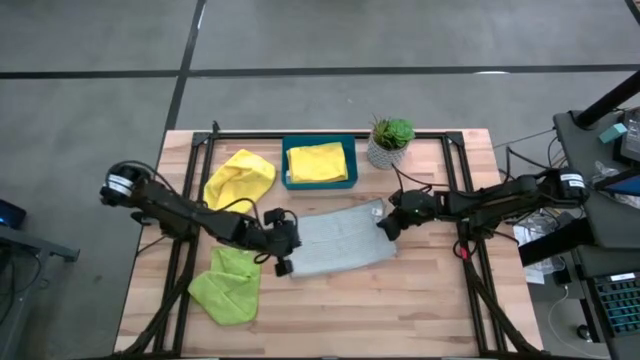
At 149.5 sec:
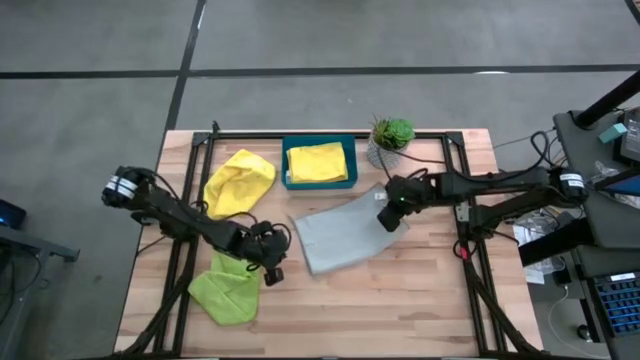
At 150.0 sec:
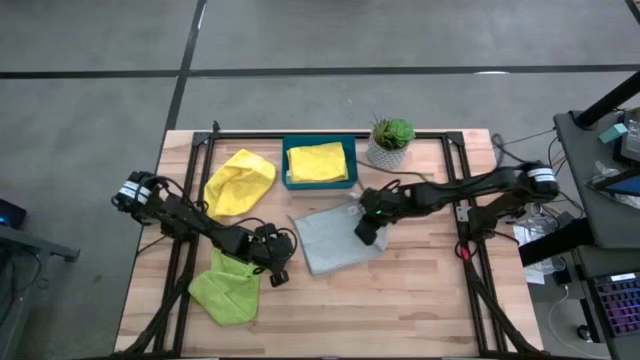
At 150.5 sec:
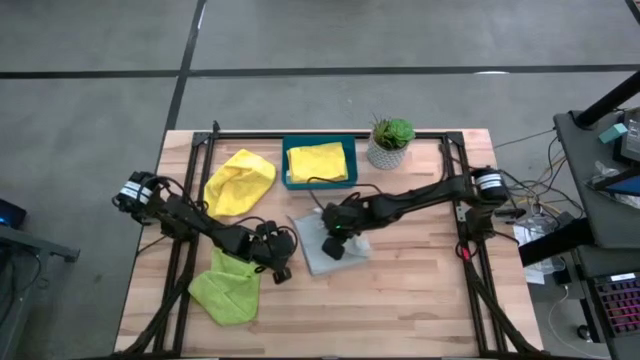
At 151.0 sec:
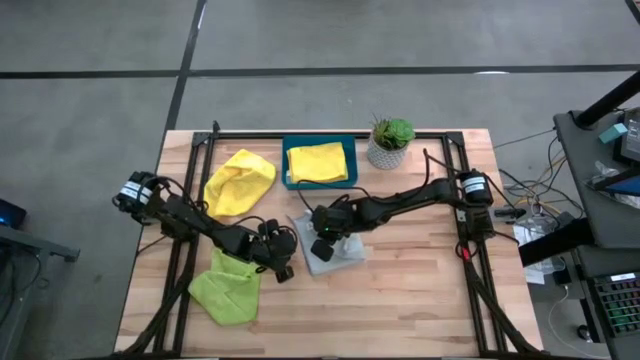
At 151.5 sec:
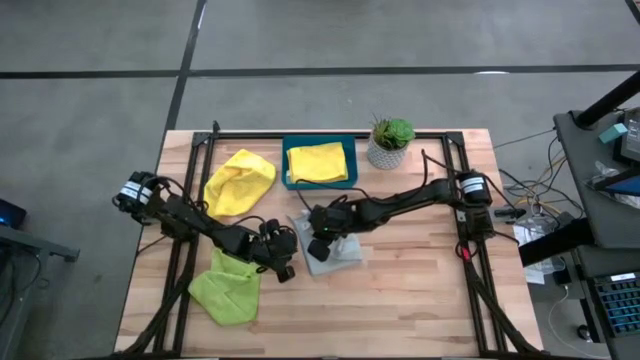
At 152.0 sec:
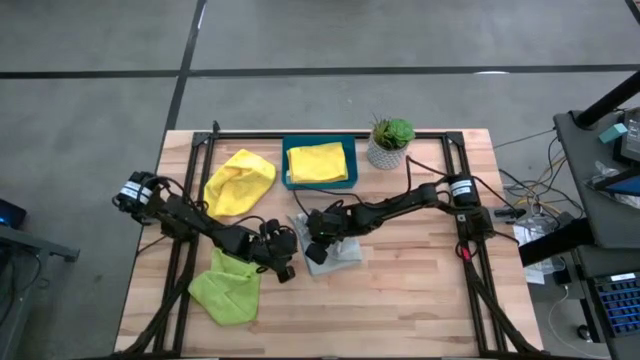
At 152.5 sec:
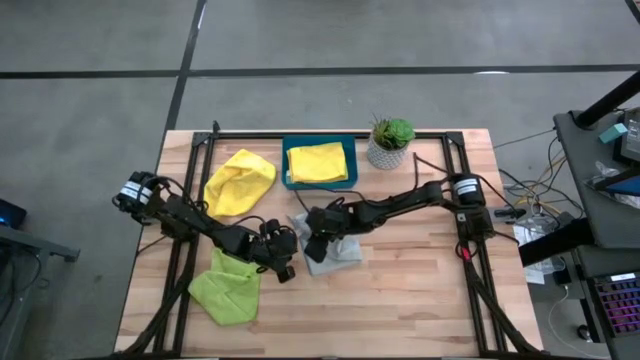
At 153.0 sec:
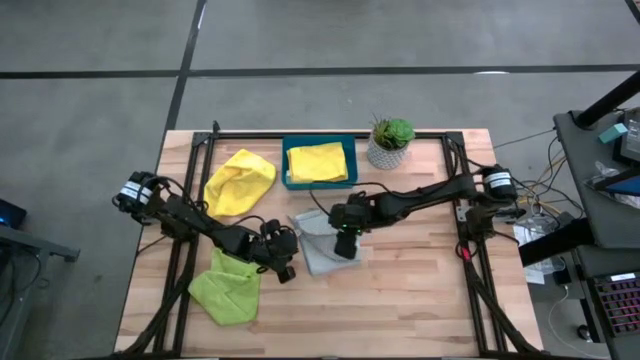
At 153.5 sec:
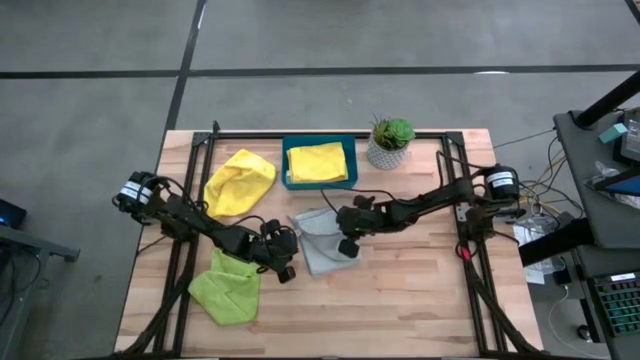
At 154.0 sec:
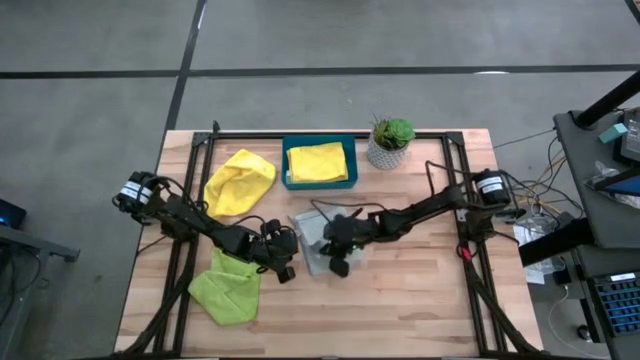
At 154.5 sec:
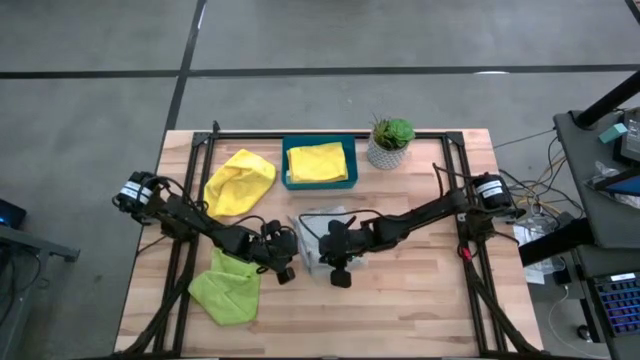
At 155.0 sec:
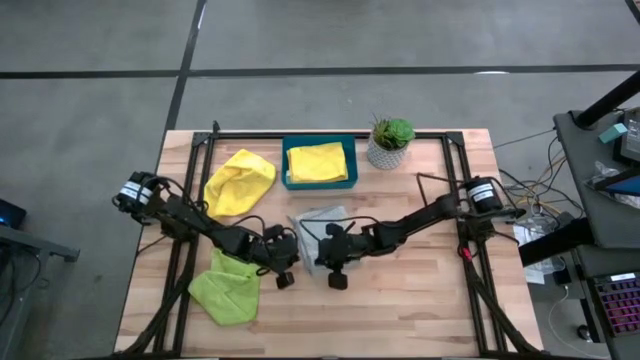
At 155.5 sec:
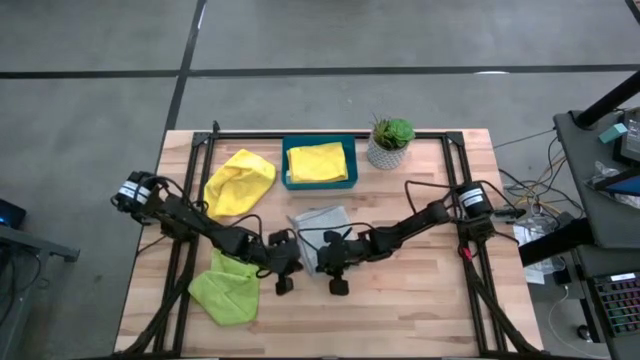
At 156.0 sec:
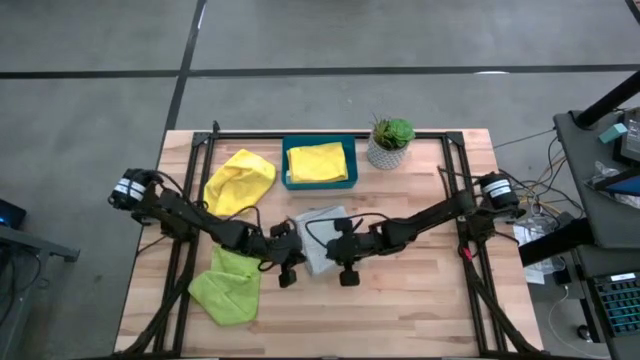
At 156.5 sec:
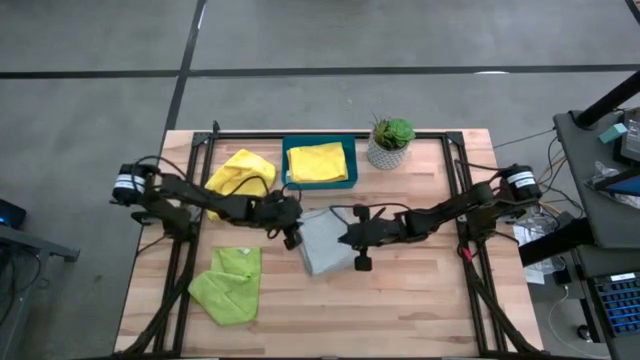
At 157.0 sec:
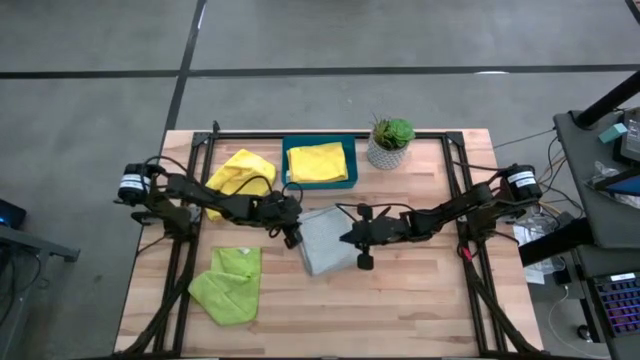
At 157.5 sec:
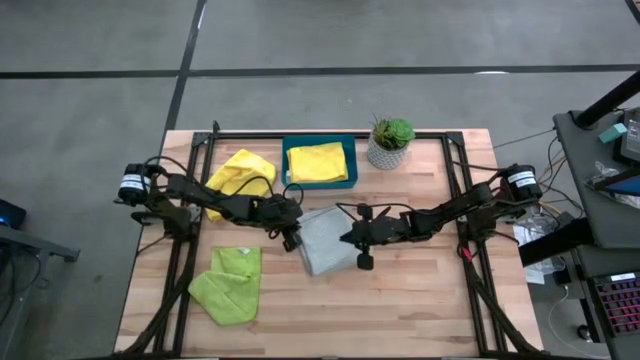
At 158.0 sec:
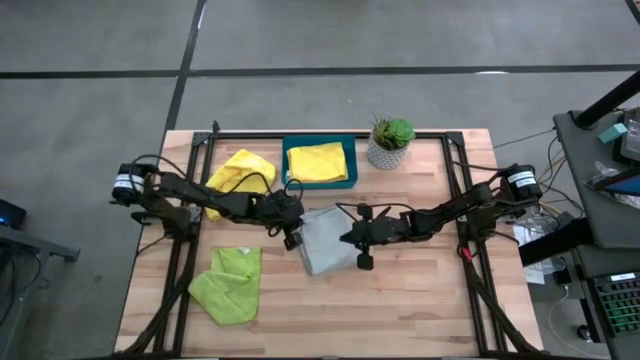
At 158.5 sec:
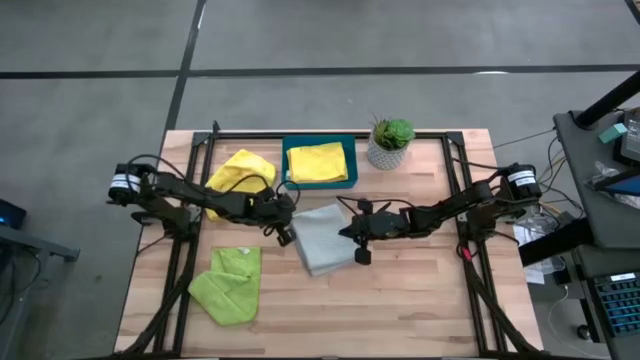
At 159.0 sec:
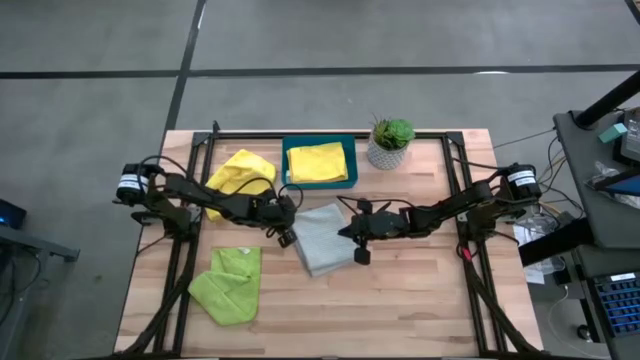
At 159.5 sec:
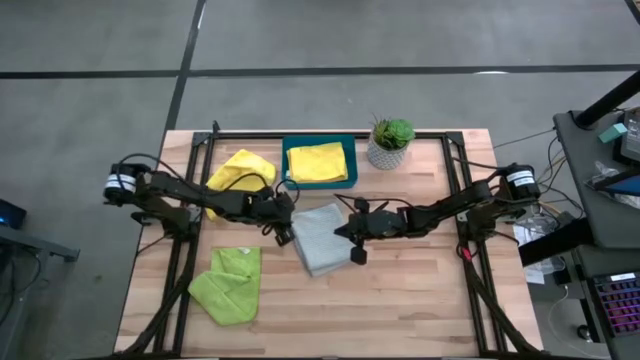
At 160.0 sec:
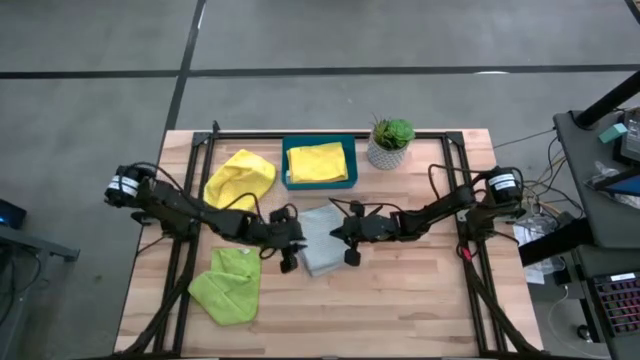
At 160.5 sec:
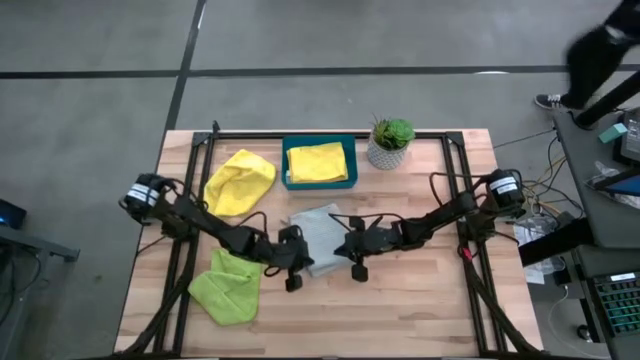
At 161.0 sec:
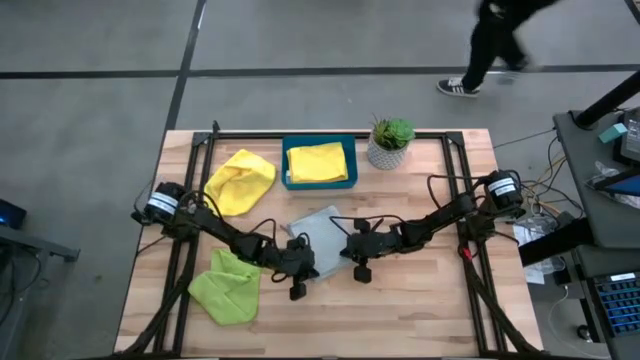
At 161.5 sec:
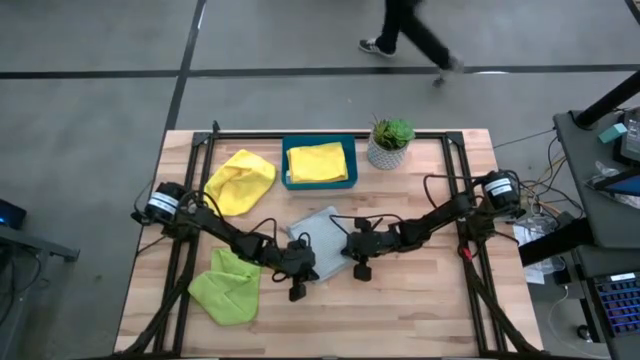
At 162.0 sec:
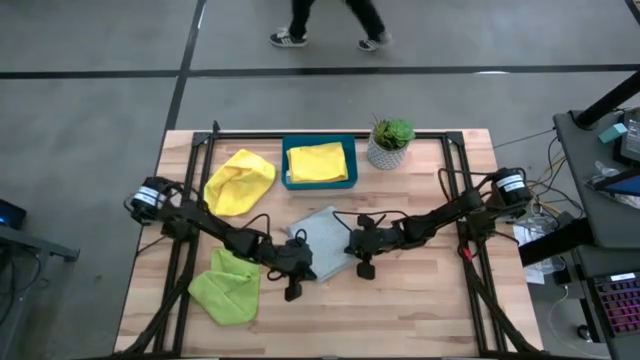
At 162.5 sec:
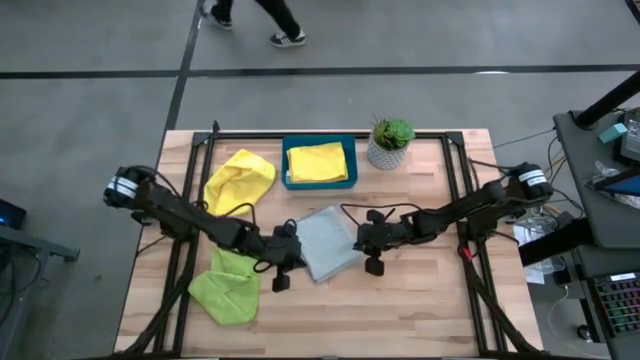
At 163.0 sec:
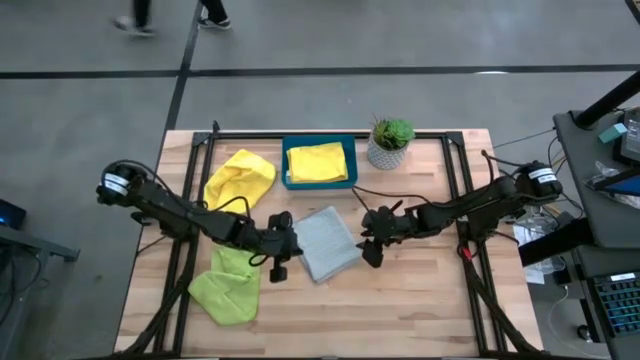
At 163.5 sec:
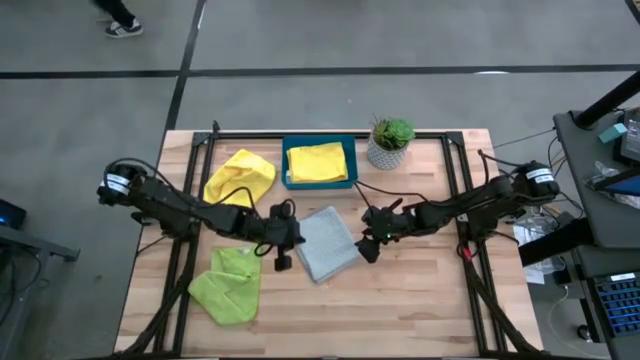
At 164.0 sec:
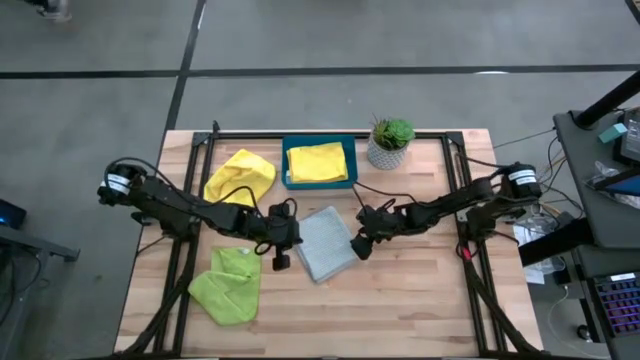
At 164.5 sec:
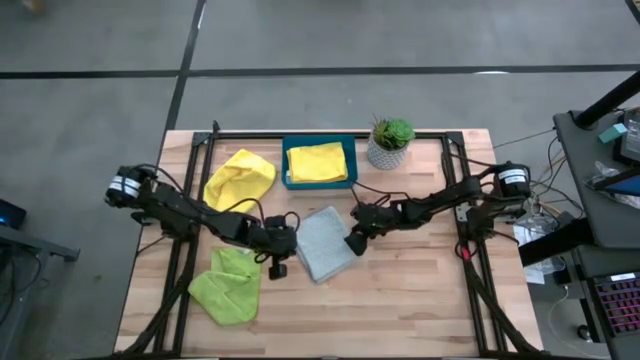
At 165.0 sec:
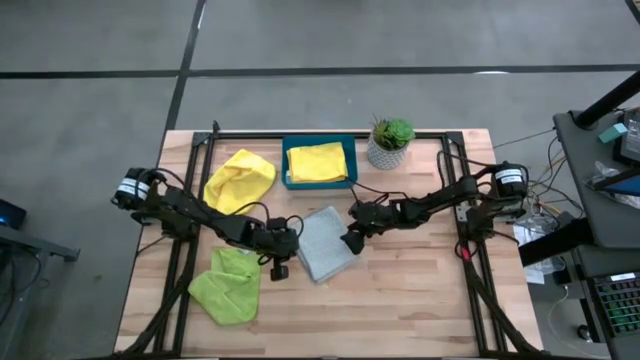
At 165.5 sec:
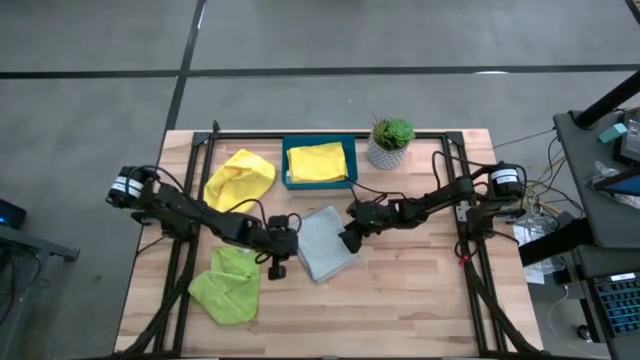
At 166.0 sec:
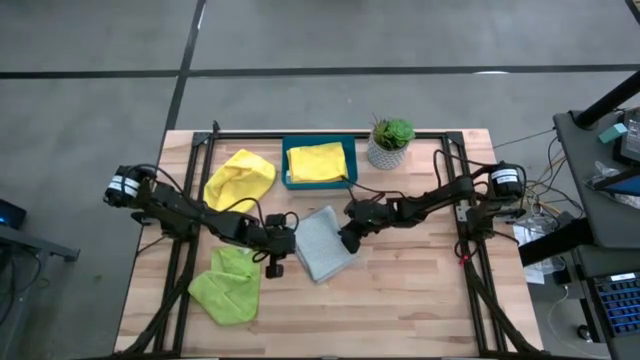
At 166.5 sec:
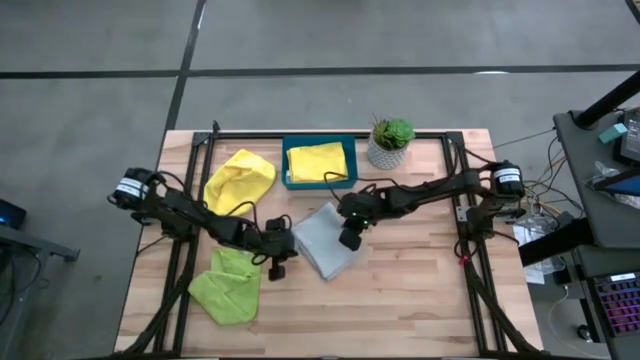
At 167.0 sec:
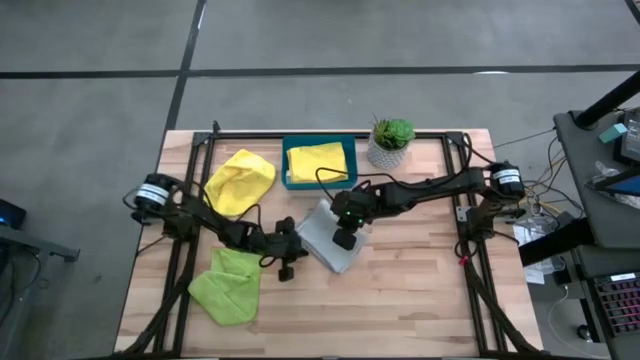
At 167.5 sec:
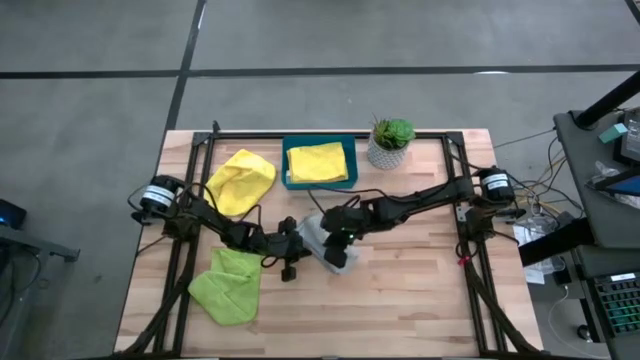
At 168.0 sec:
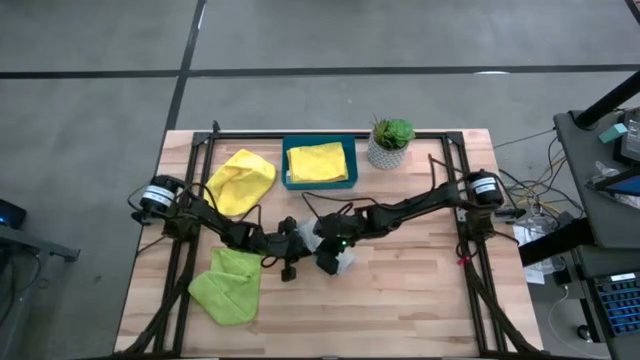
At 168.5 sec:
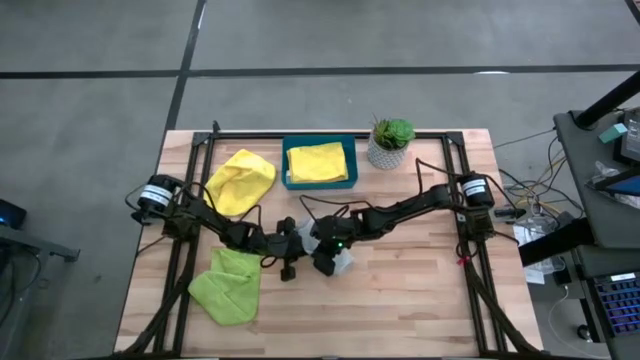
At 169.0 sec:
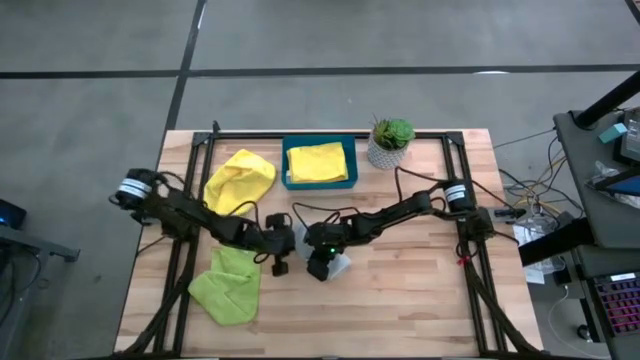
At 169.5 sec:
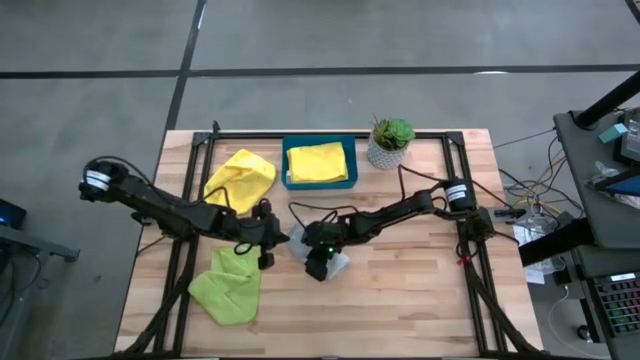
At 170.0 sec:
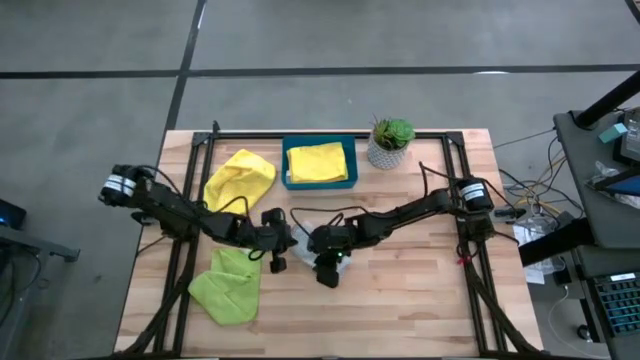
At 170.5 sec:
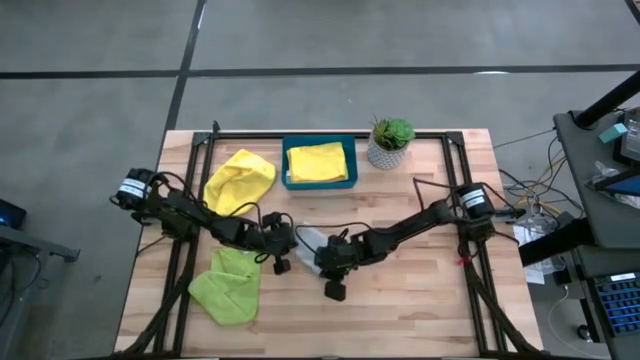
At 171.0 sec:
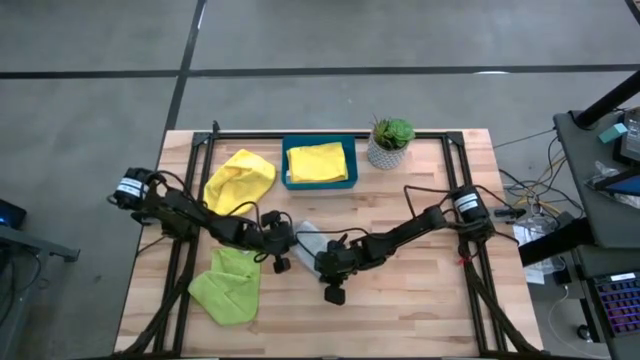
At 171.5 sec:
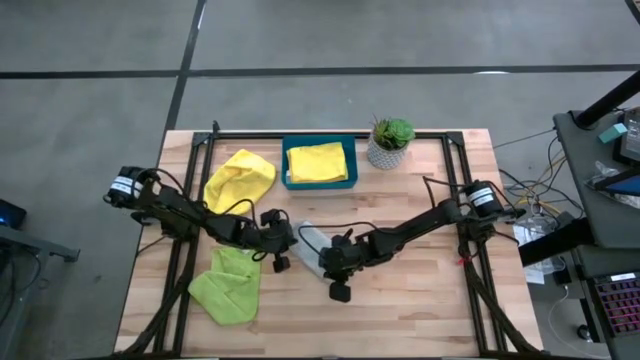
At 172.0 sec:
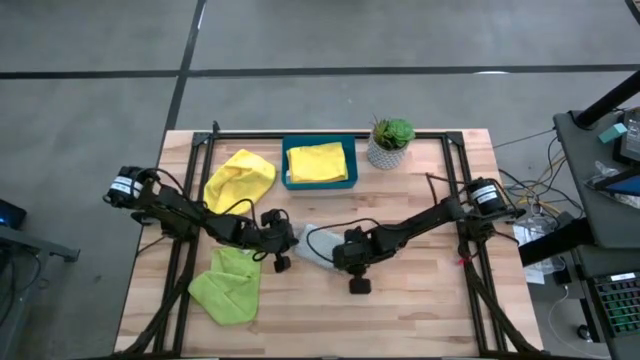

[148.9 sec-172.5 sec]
Task: Fold microfiber towels
Fold the gray microfiber cloth
